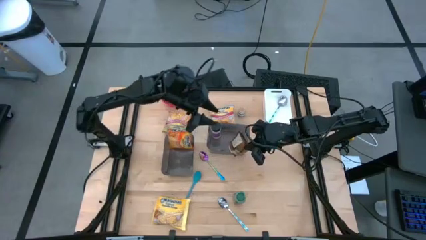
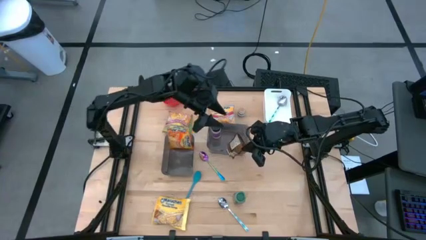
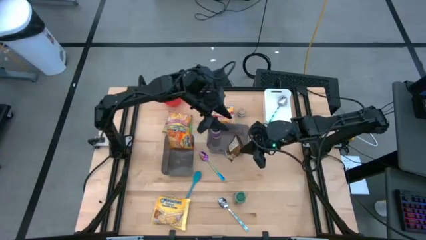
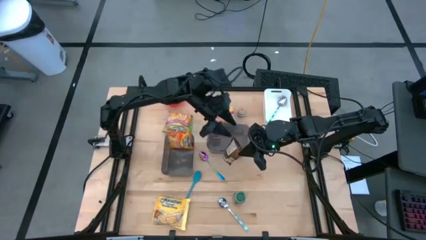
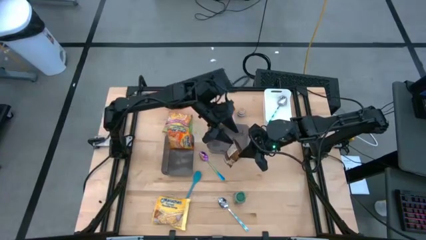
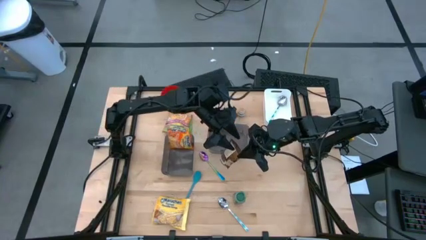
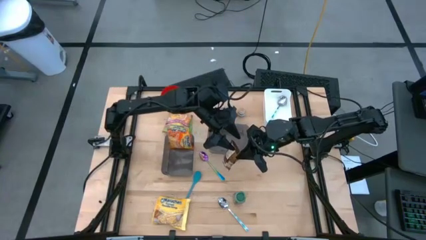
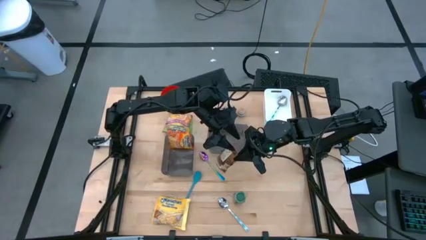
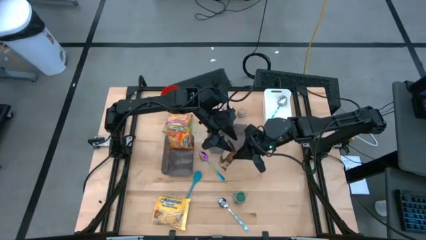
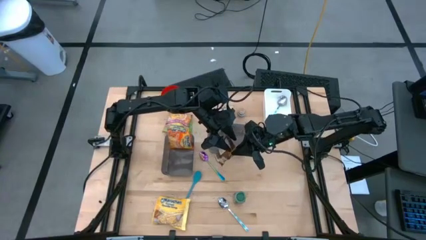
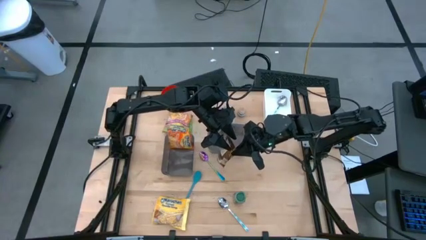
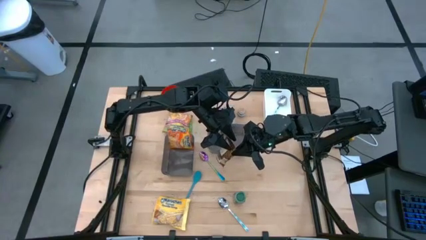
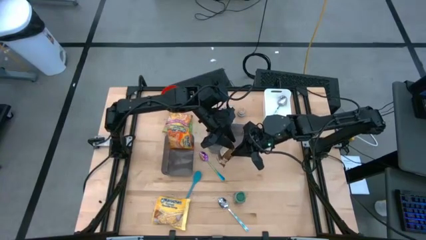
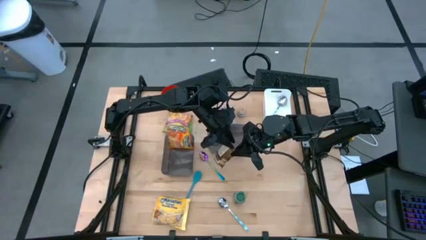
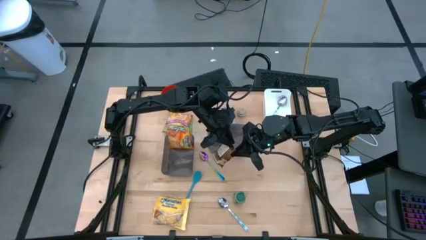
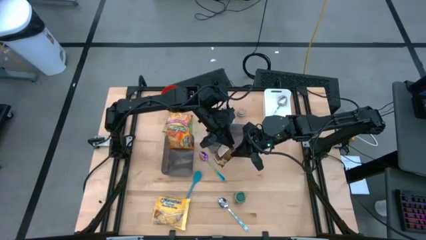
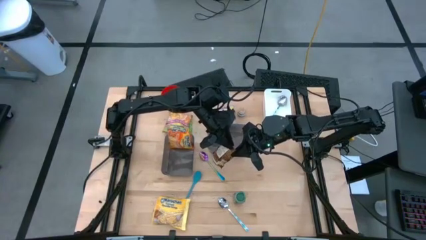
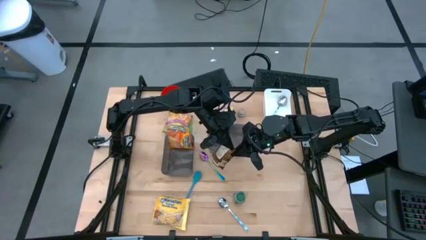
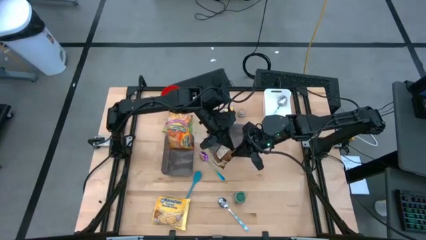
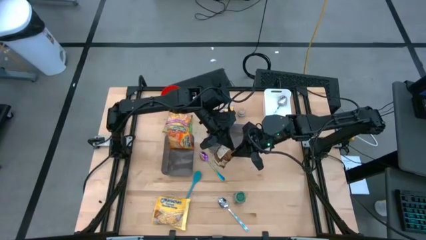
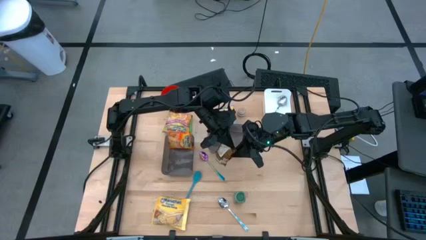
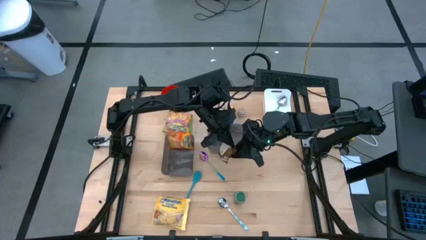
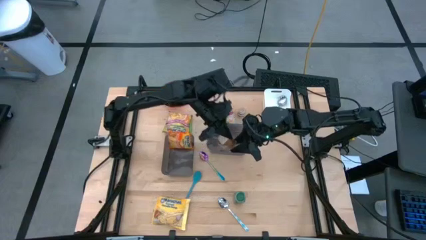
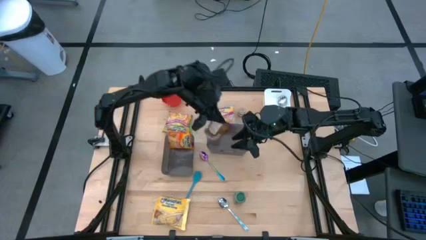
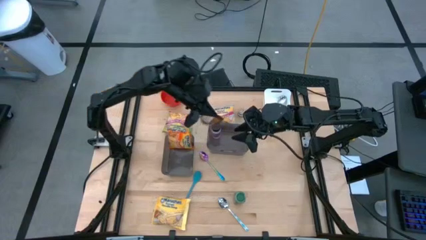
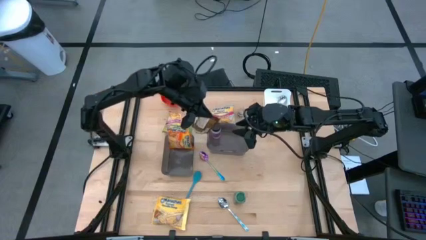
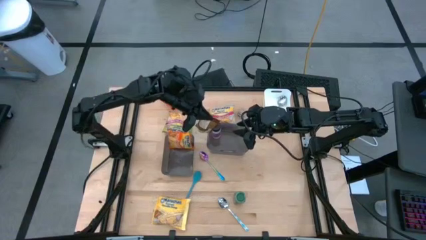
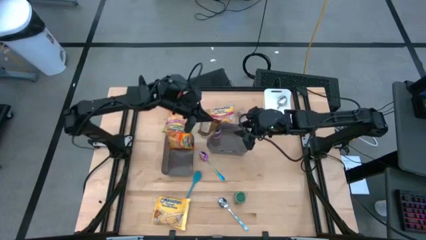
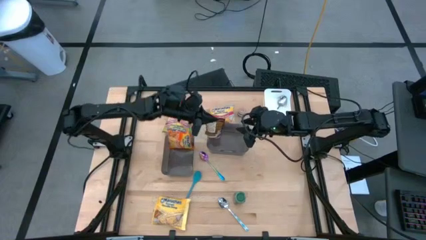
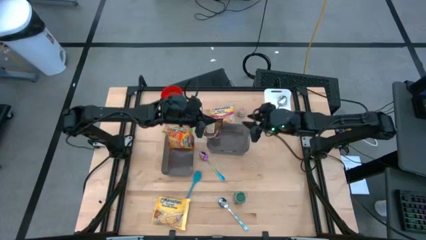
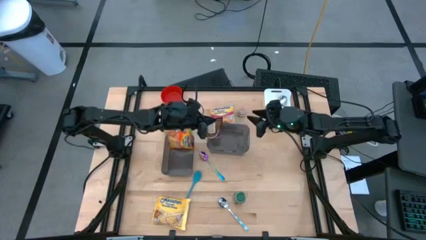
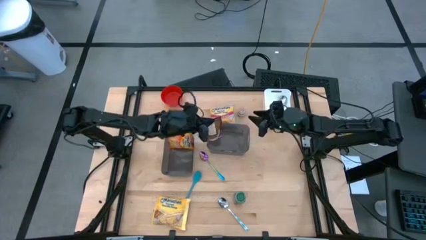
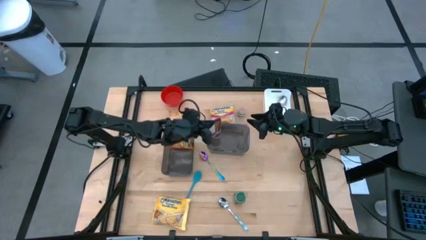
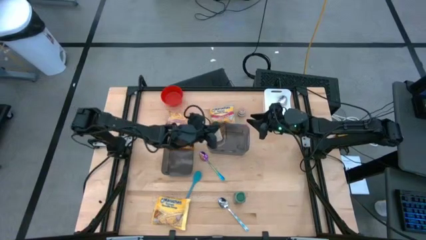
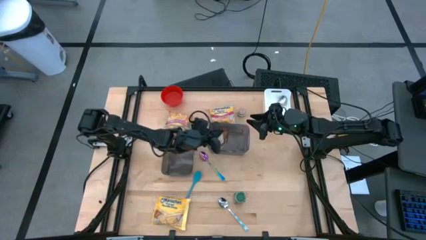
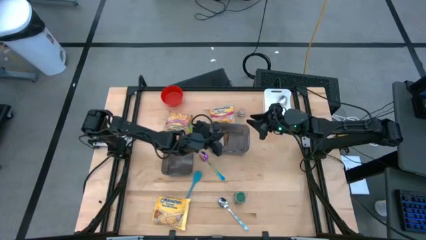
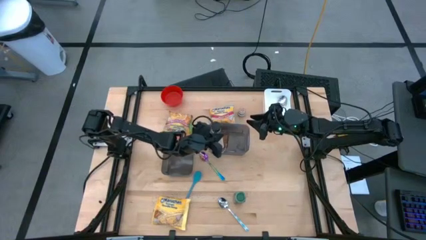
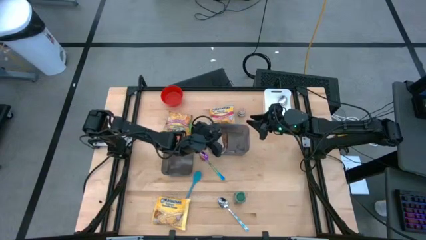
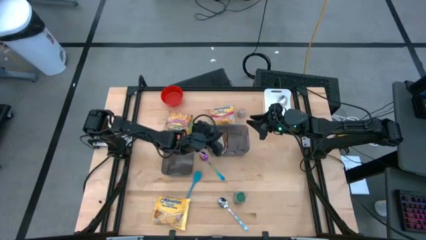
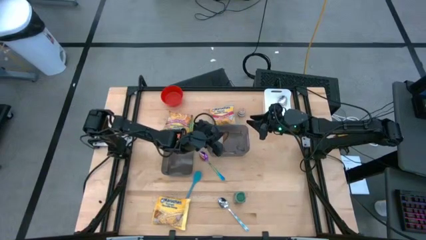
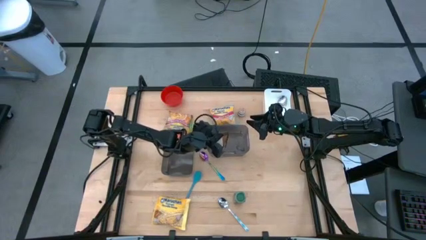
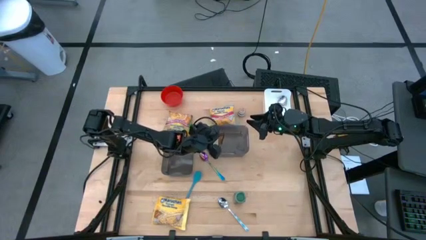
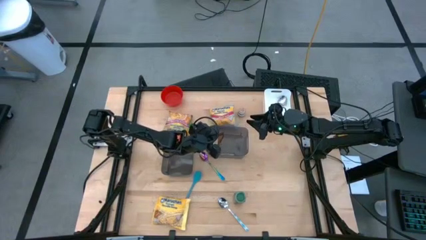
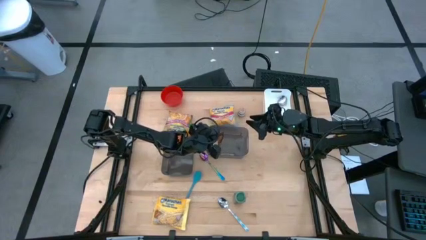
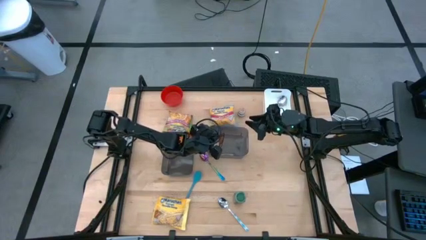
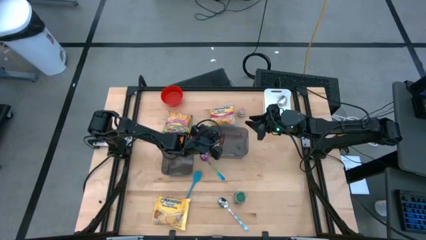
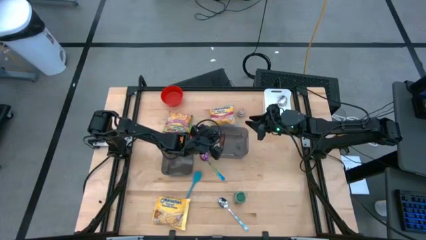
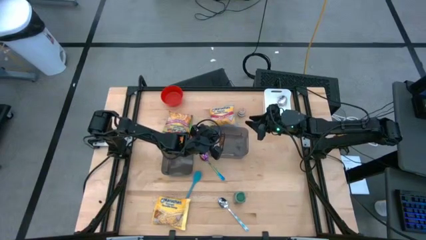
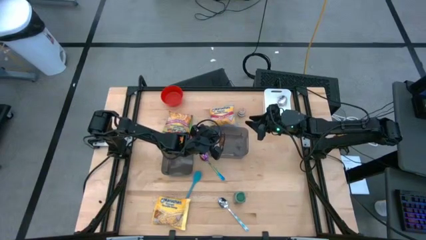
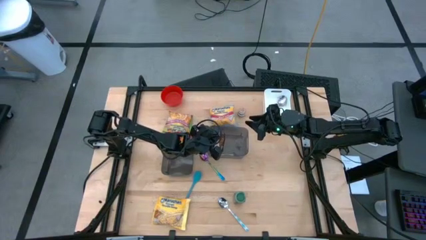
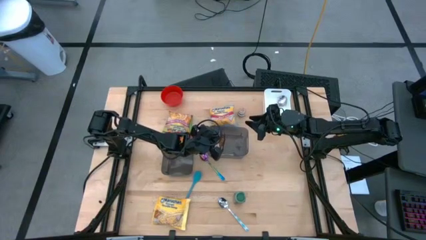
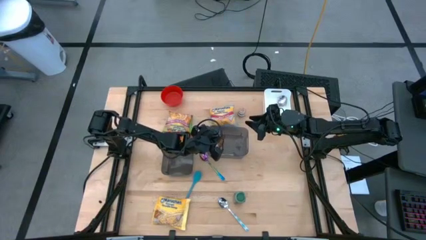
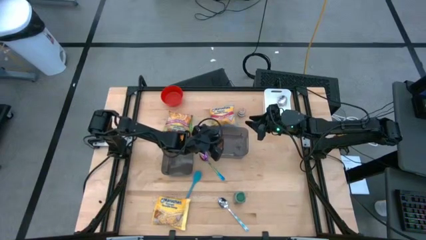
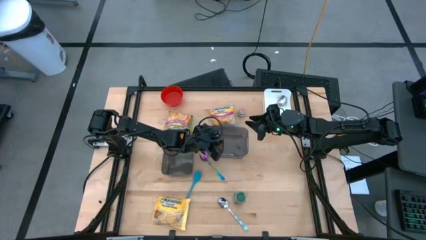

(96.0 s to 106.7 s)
Task: Pick & Place Food Item
Put the orange spice bag into the right black bin

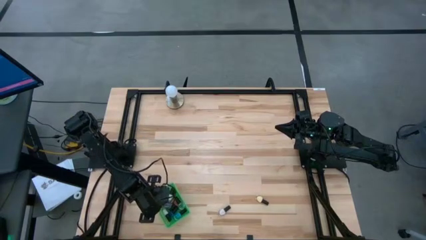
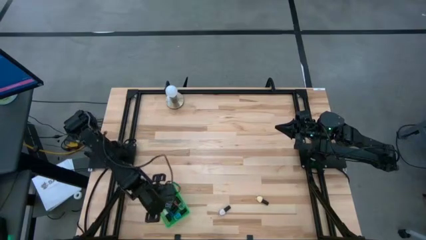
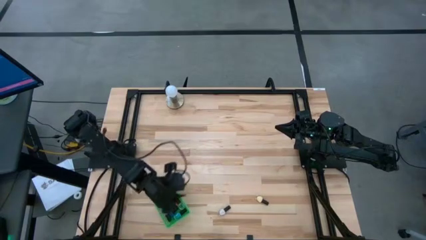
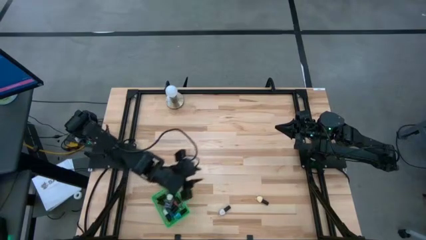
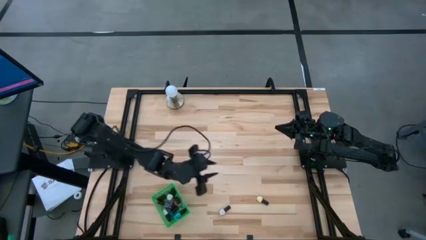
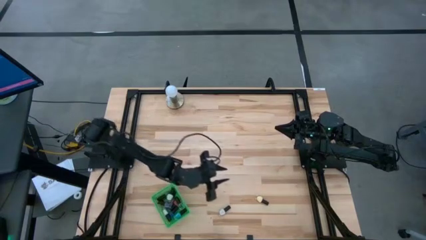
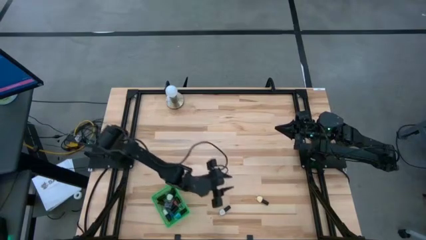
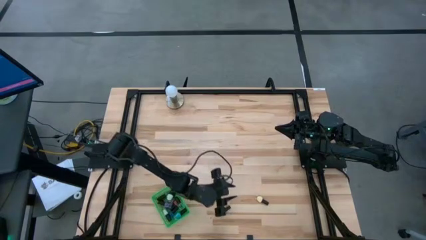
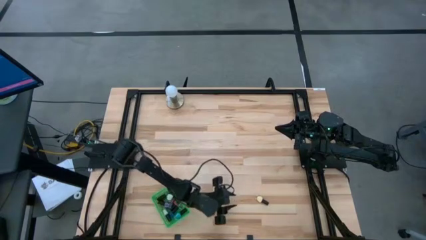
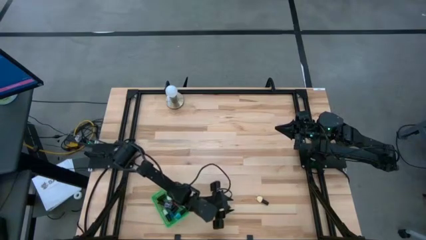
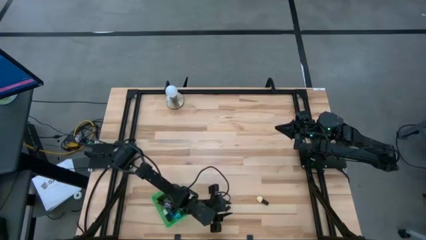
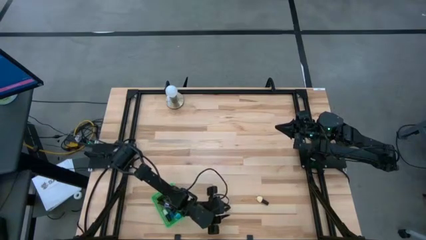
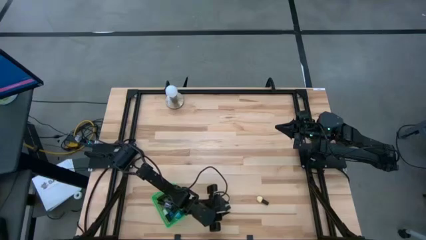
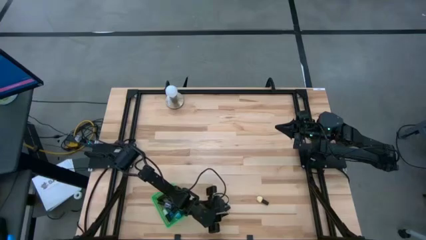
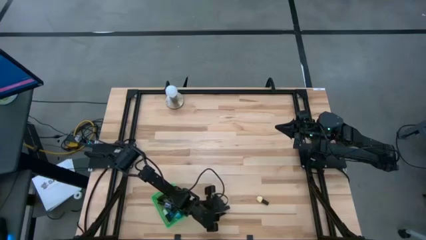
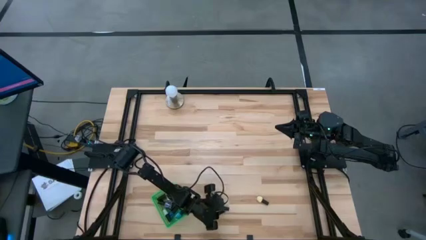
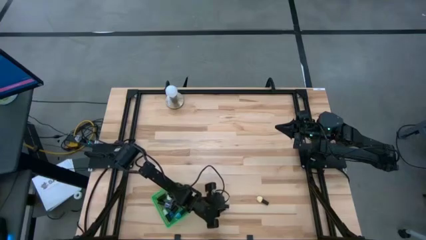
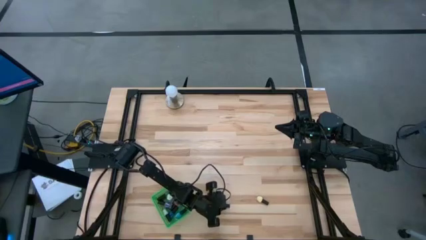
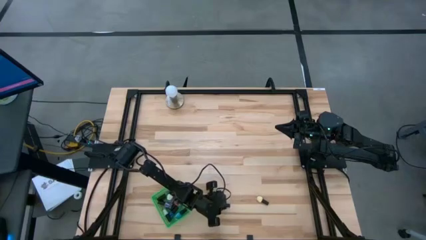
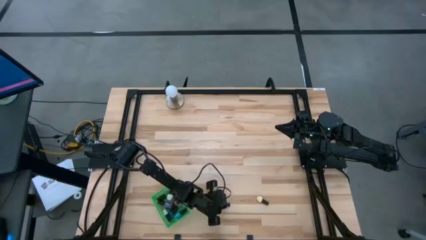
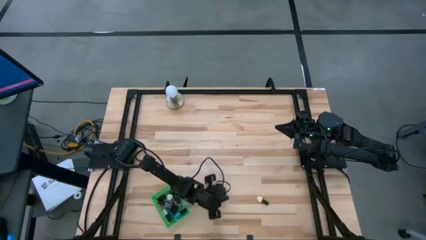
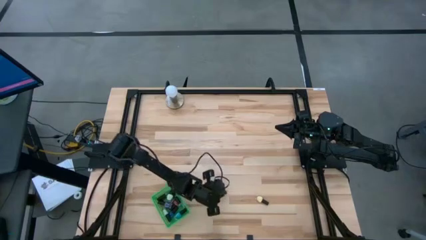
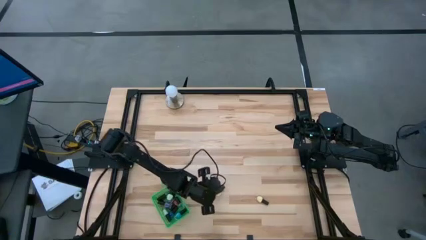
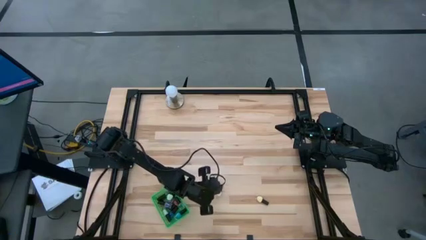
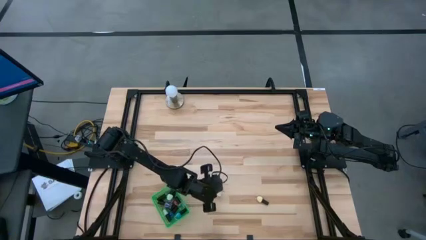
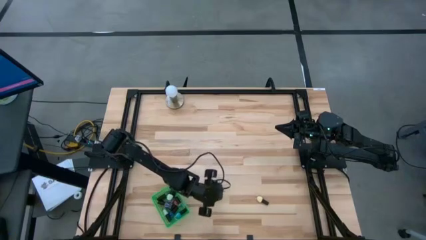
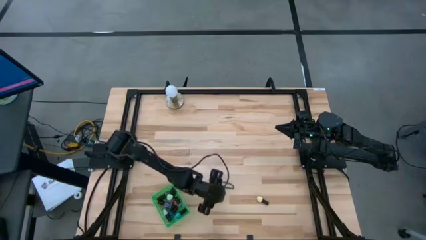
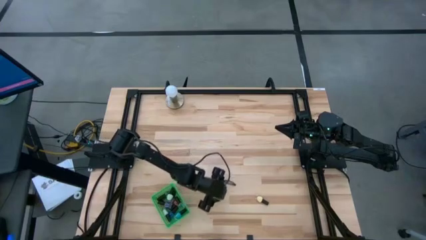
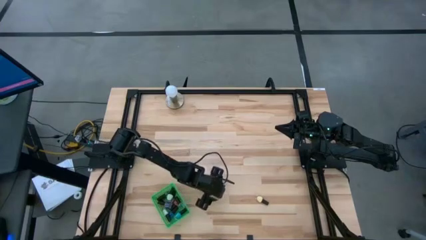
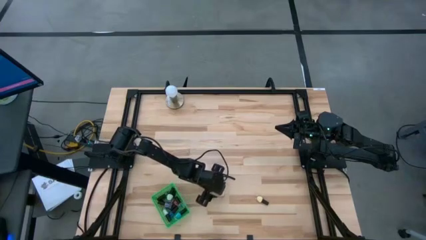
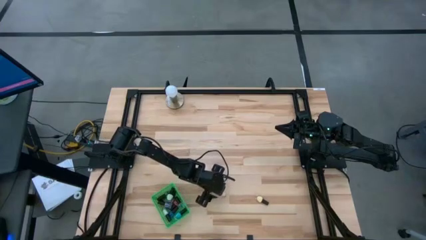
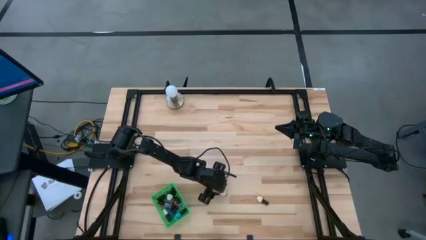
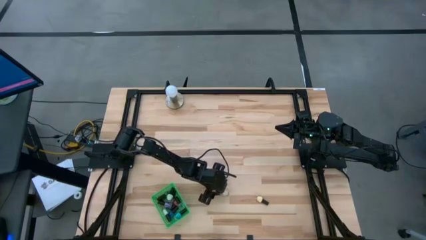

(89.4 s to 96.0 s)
Task: Pick & Place Nail Polish
Put the black white nail polish bottle into the green basket
